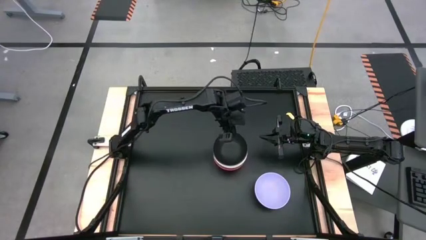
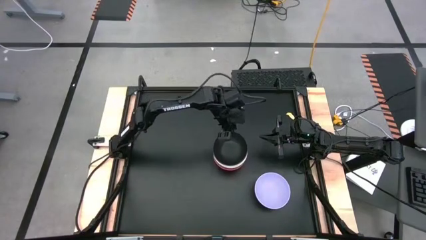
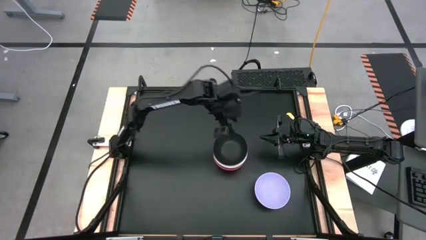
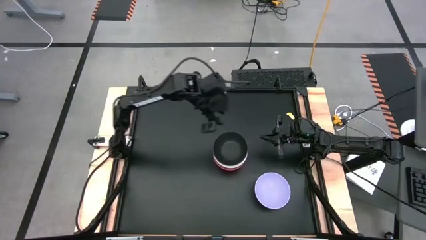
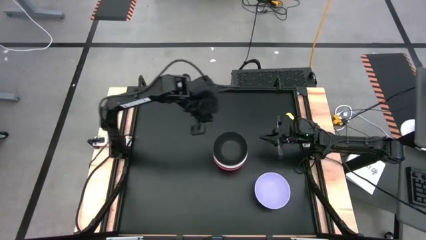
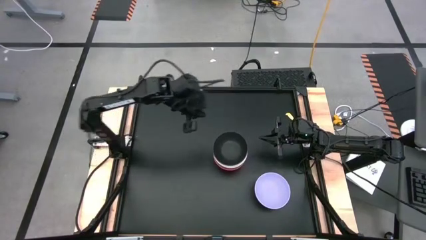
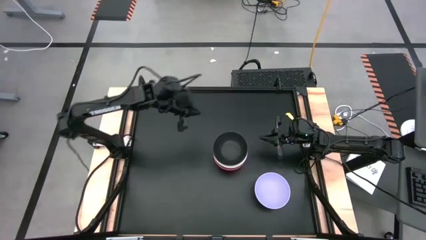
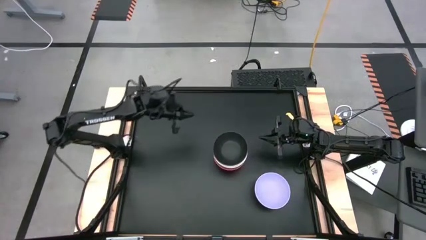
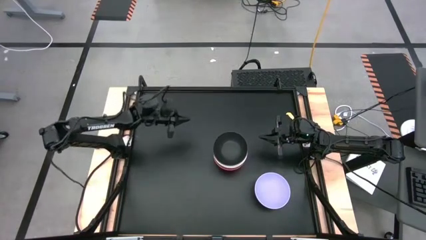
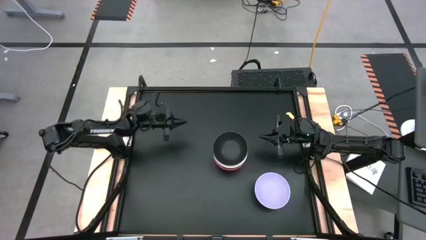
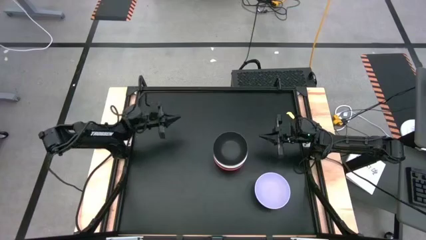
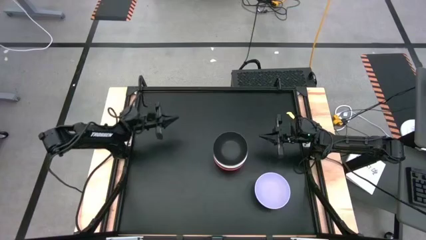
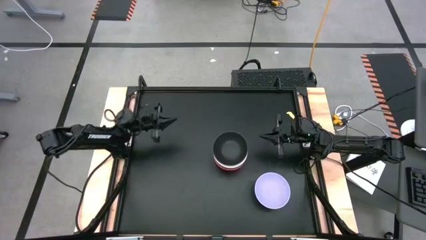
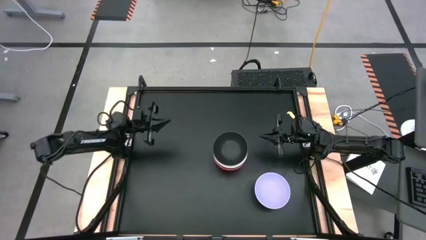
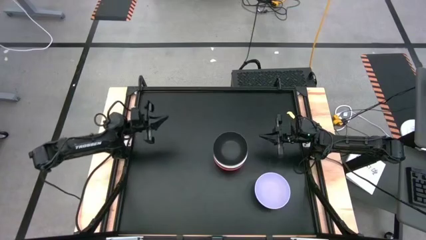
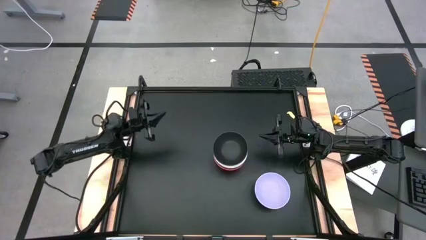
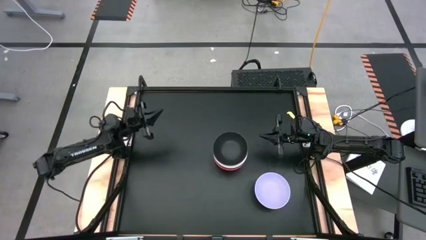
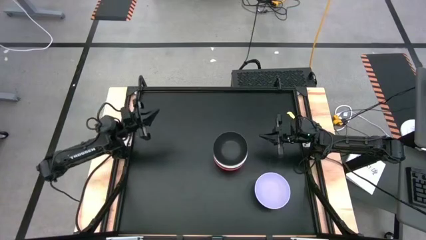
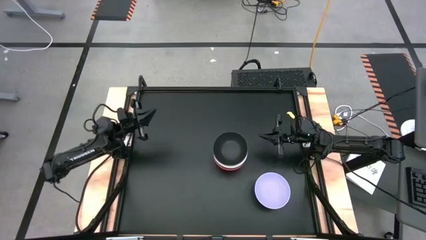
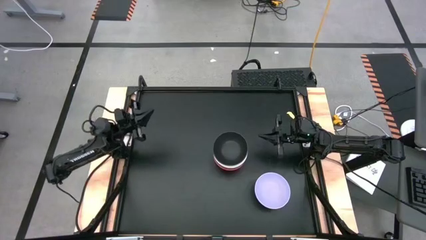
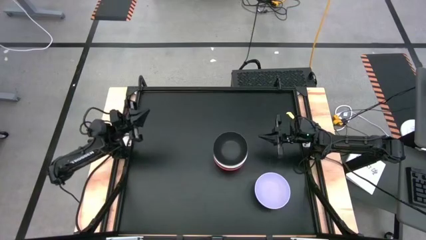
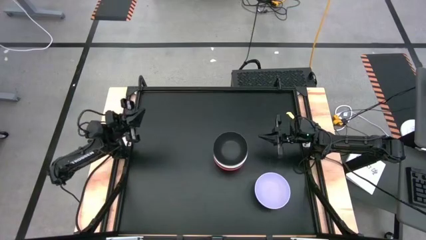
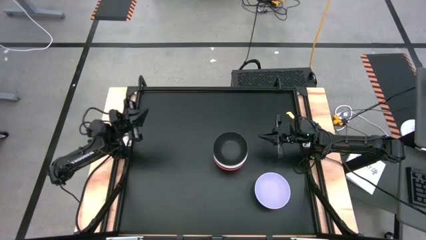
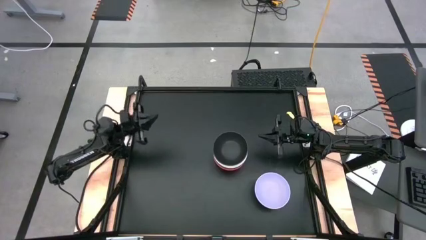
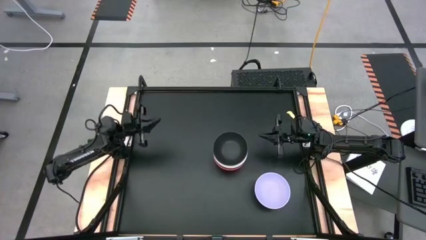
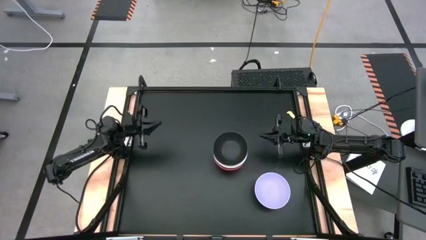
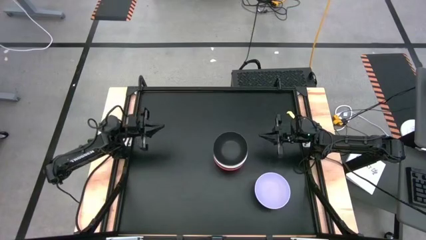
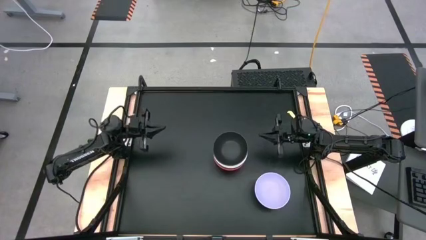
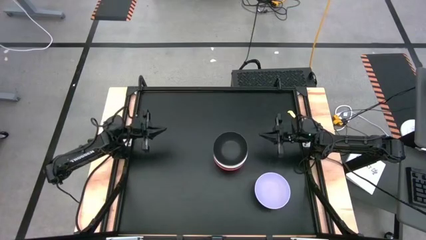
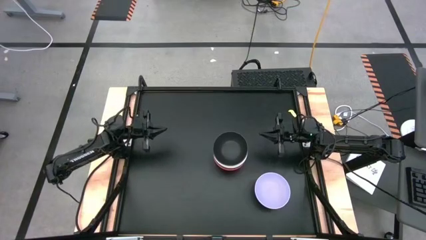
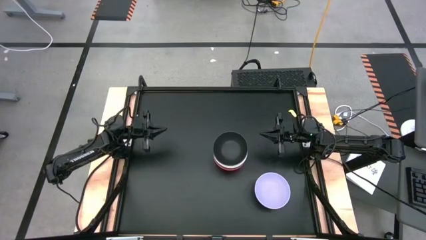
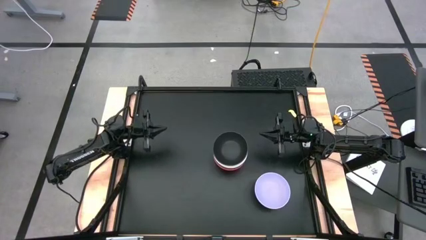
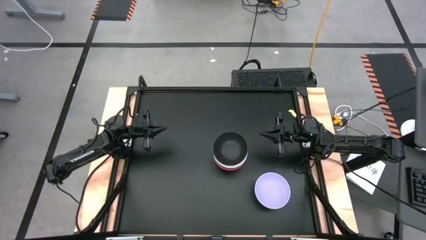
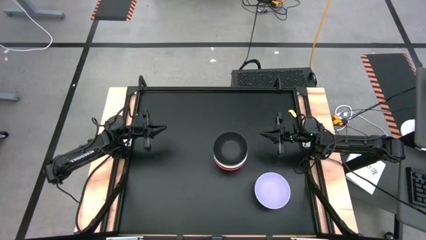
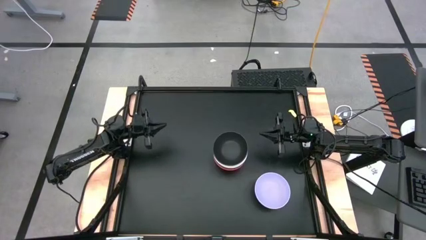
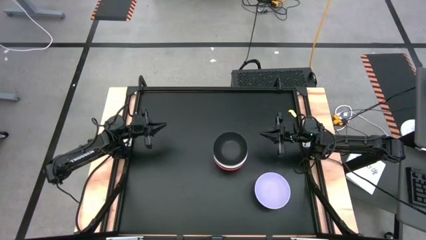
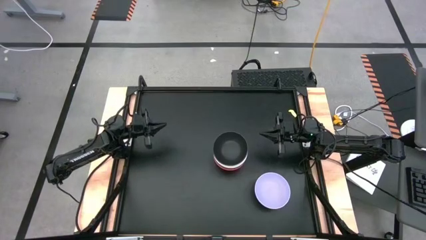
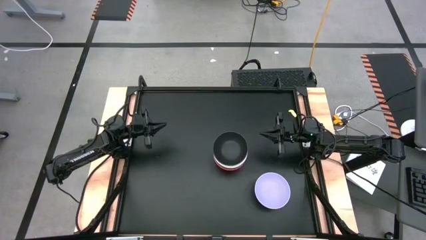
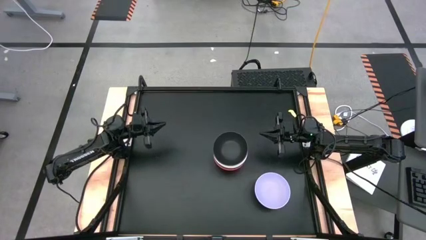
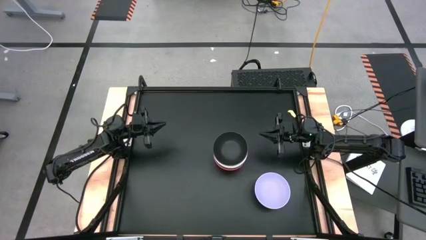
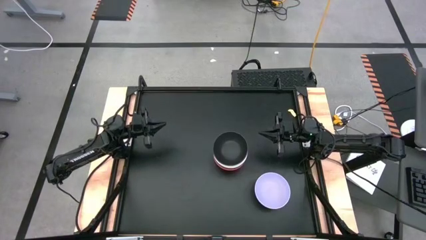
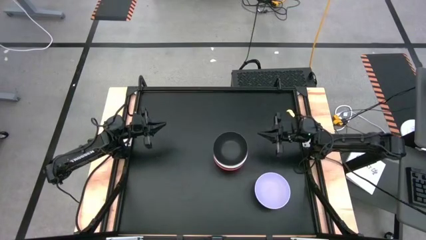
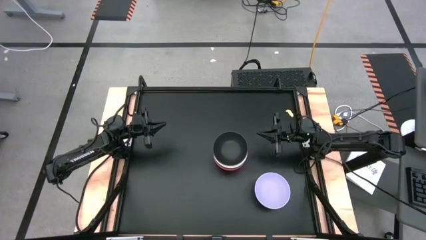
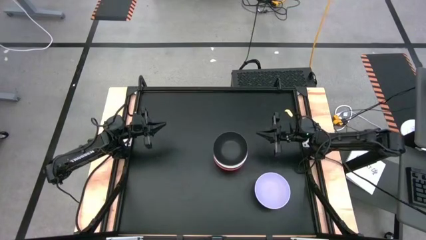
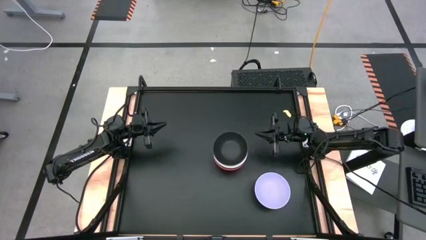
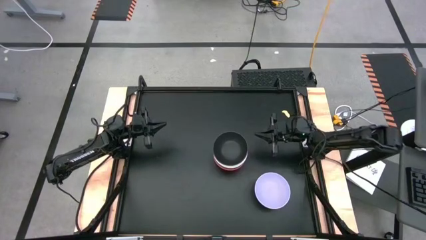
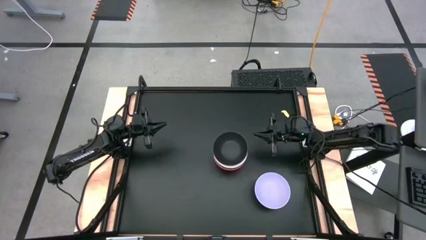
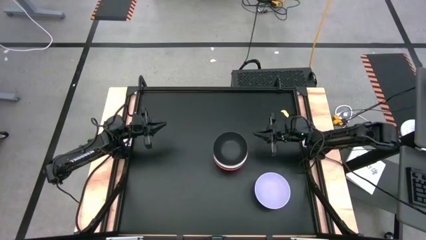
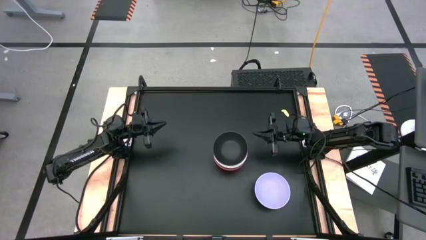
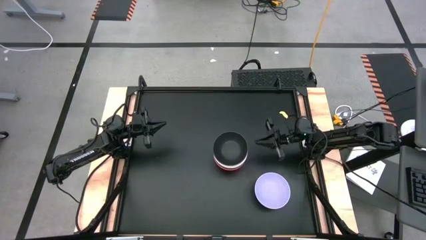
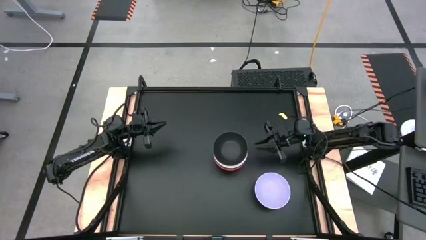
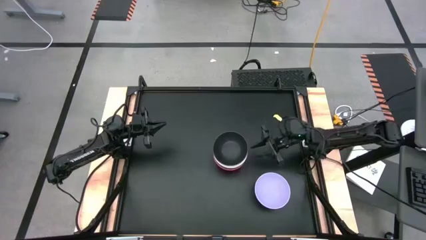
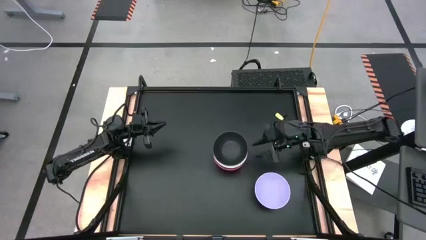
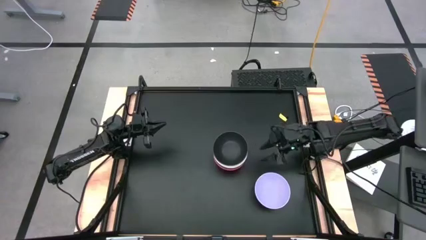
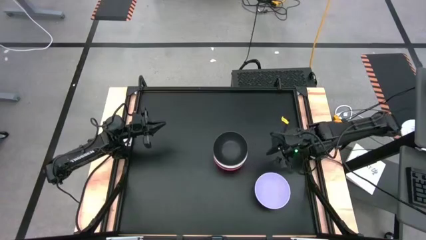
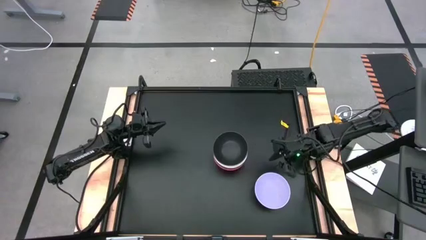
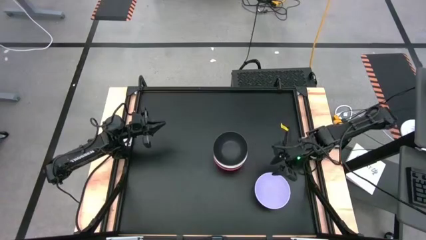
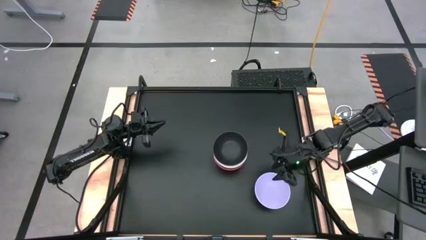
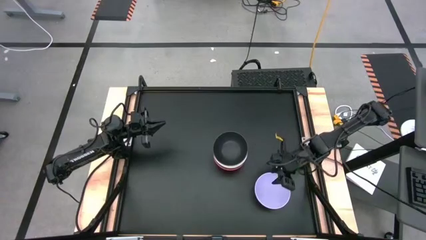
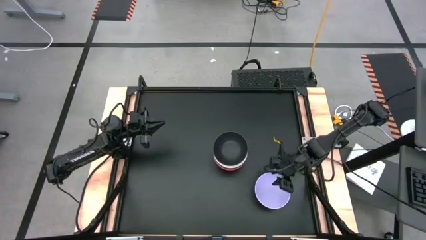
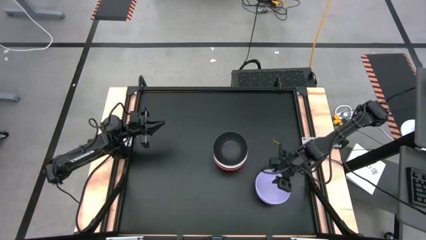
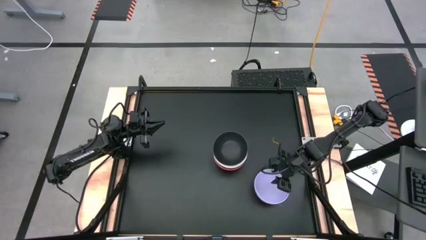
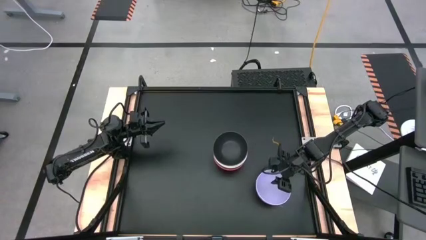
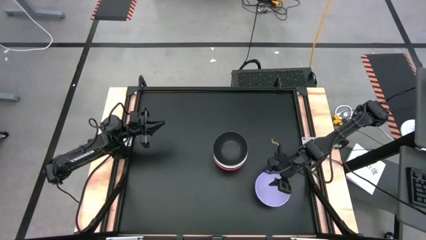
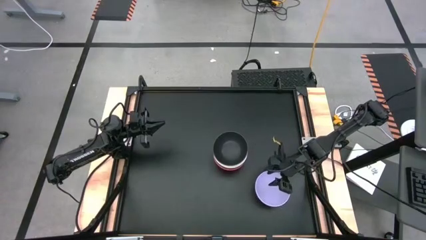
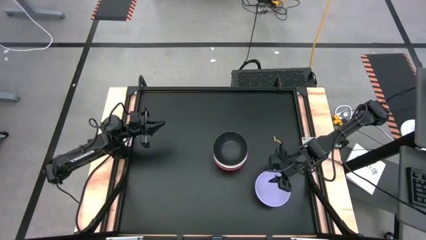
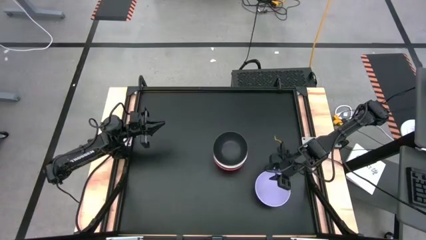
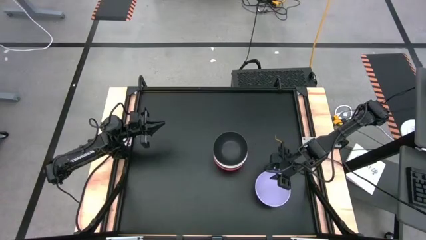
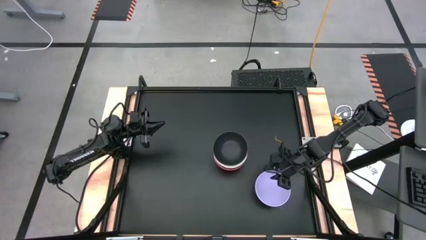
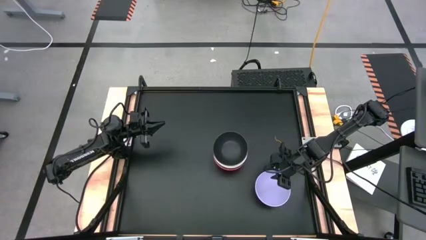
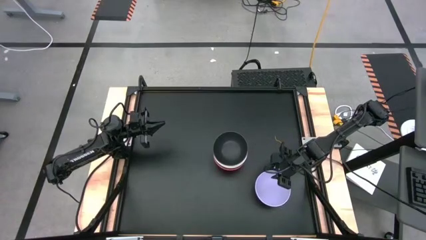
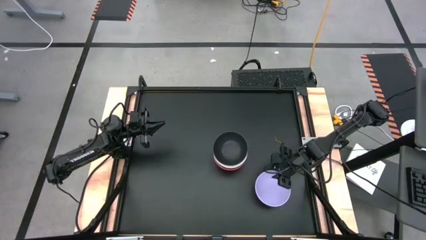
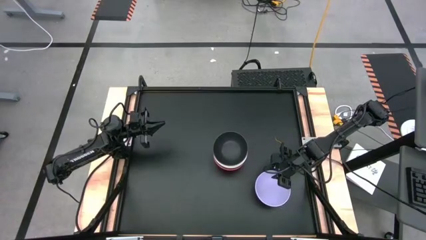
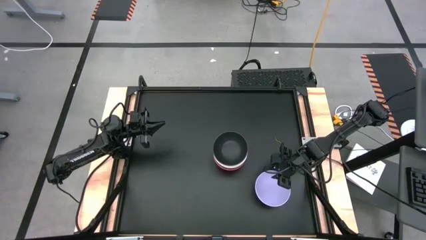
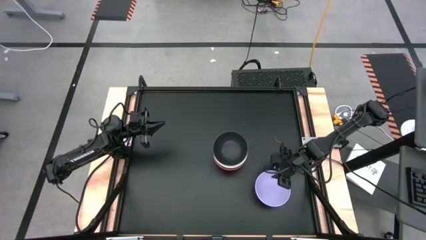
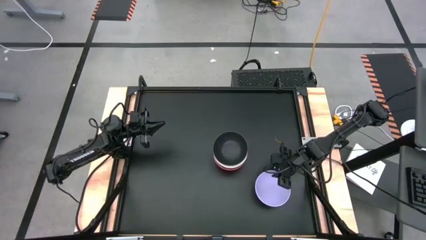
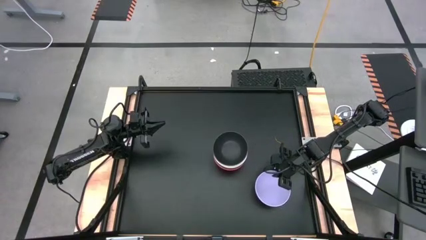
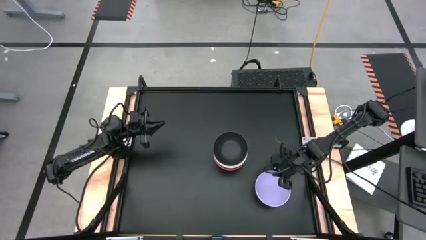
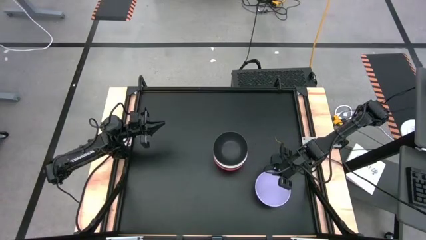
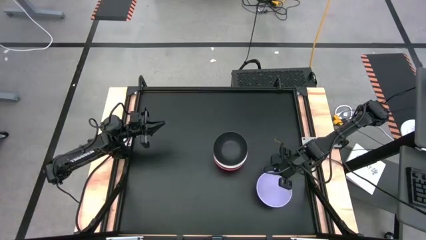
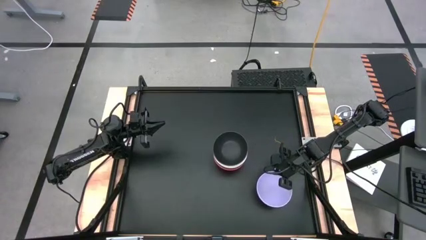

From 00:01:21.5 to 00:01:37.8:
Task: Nest bowls inside each other
Stack the purple bowl on top of the black bowl
